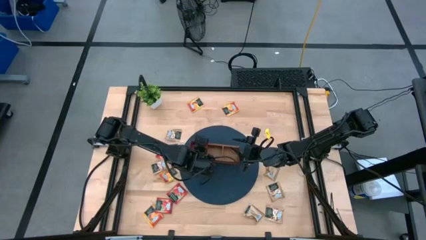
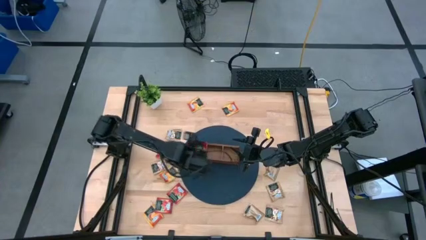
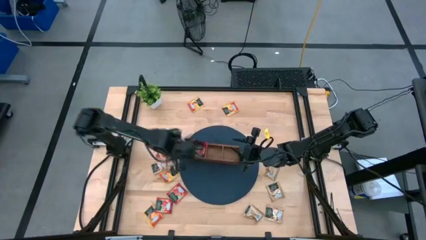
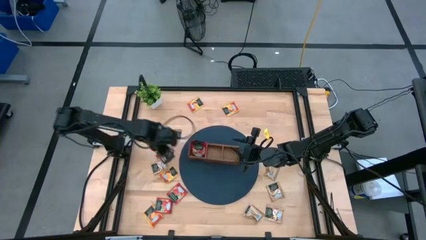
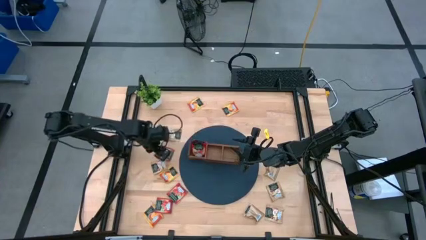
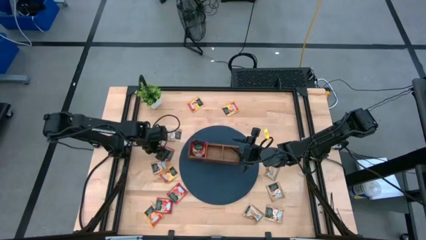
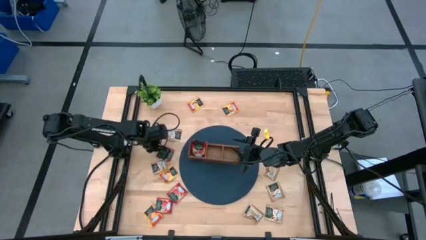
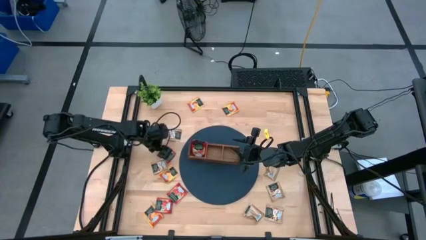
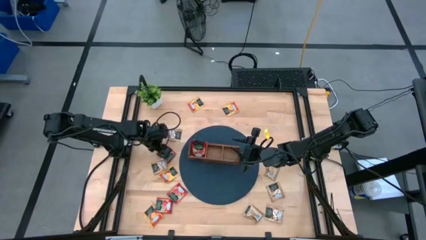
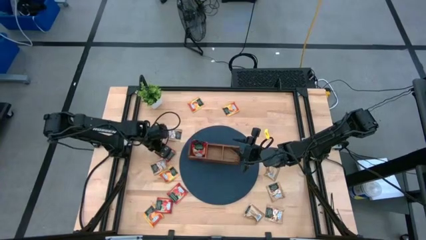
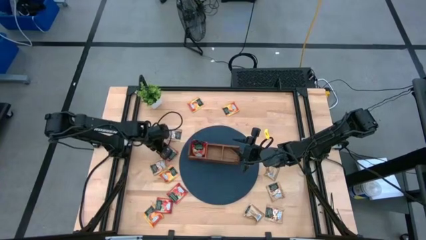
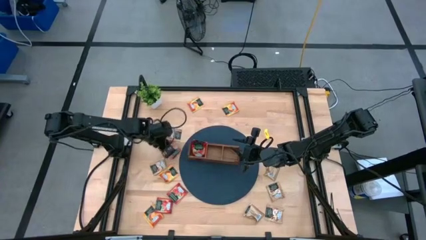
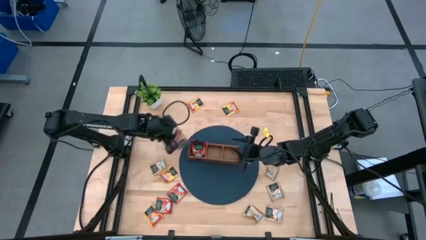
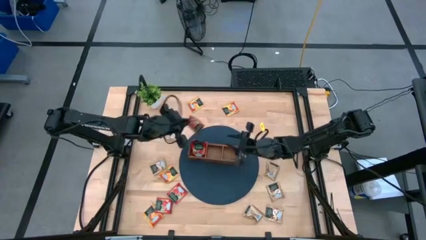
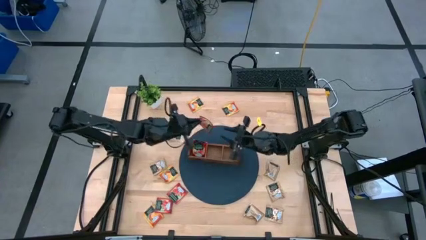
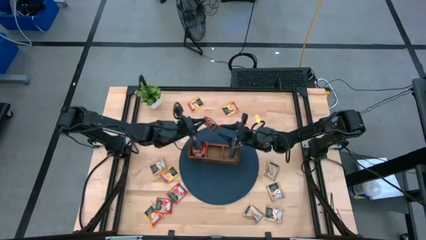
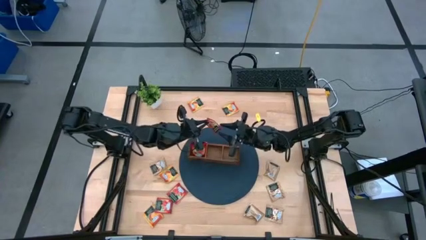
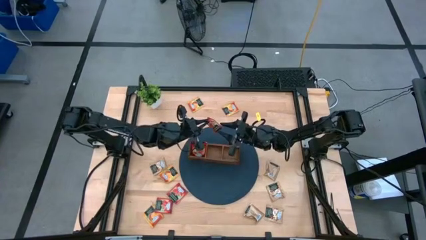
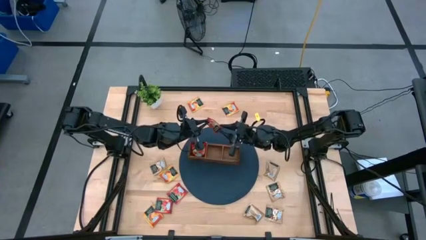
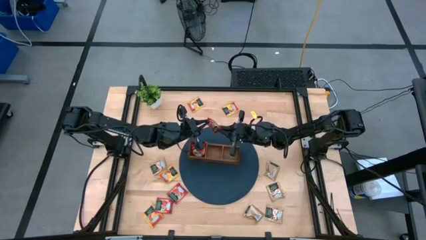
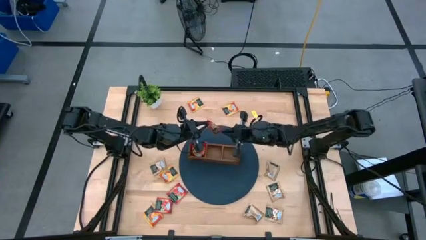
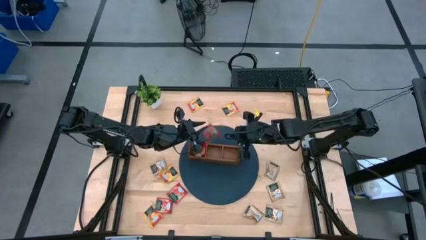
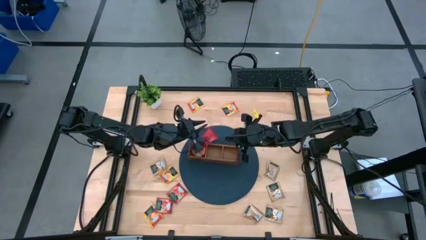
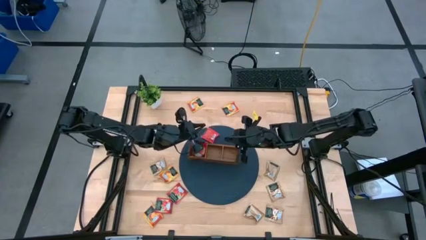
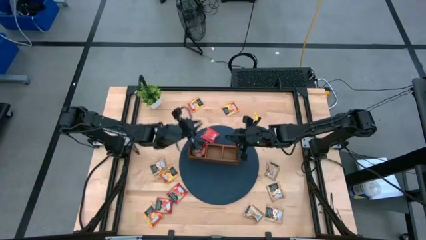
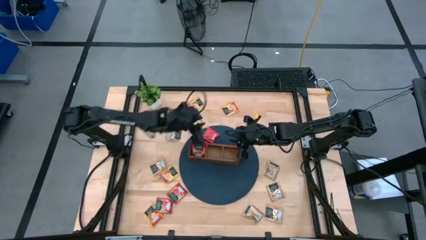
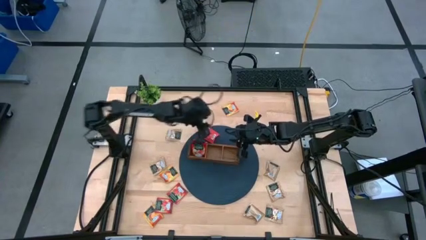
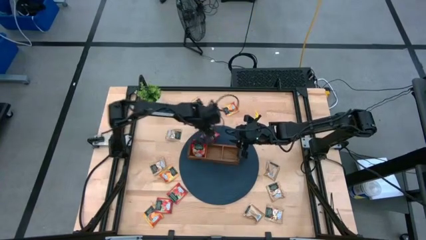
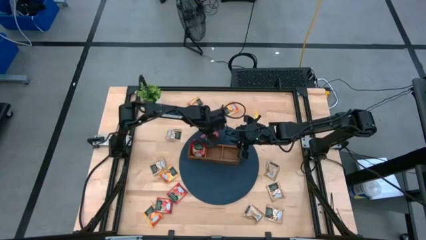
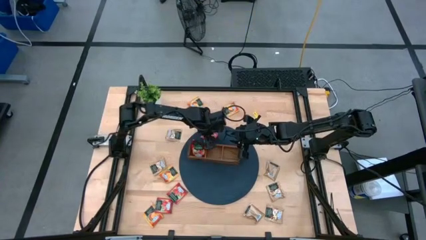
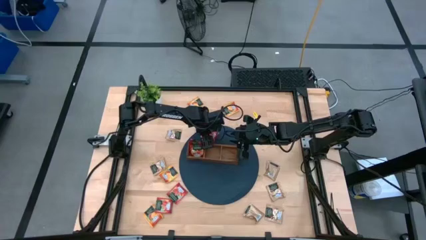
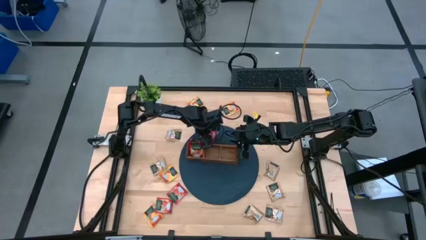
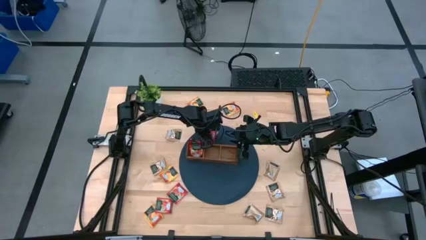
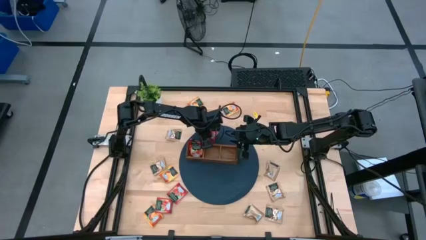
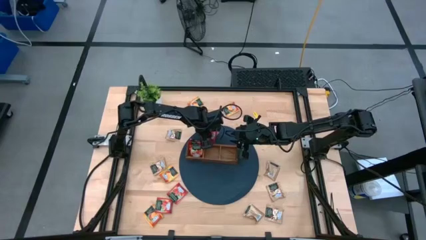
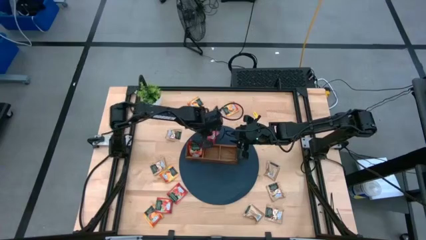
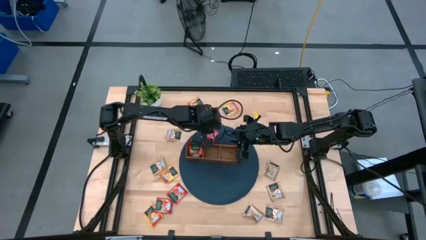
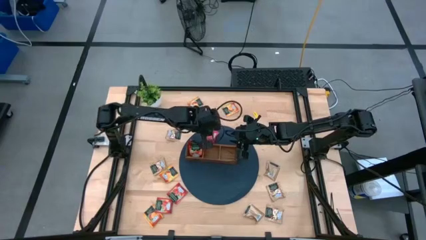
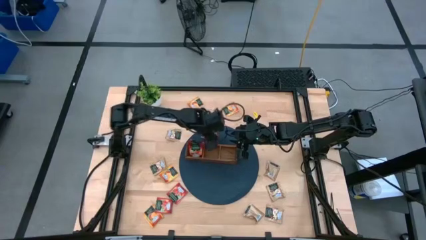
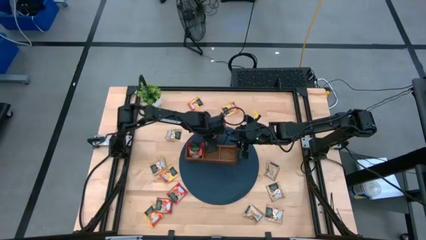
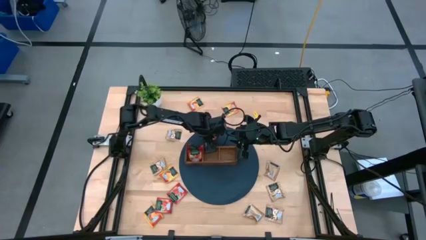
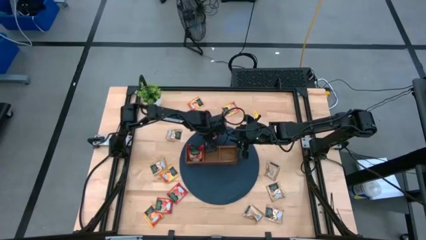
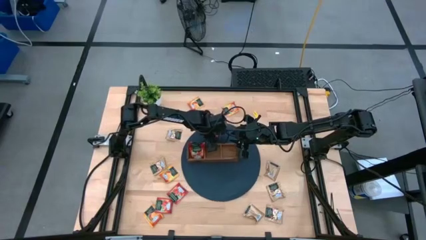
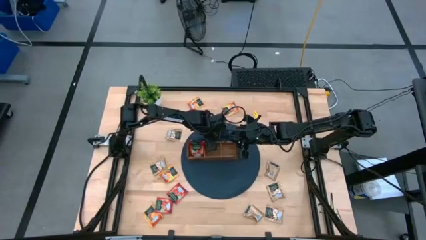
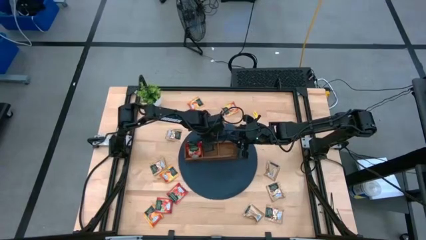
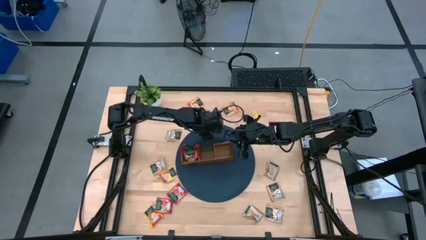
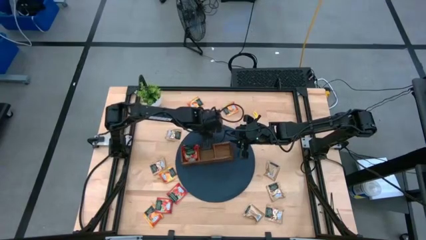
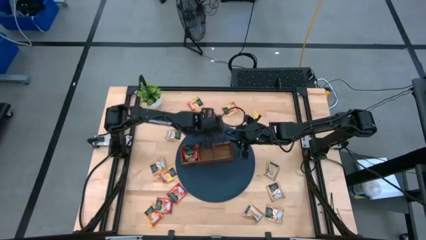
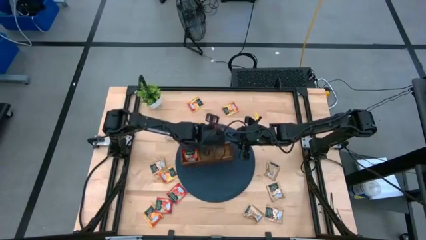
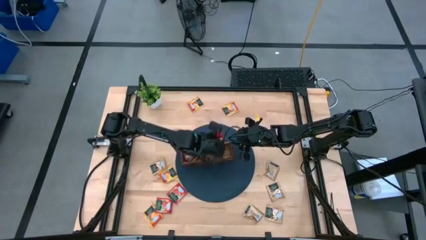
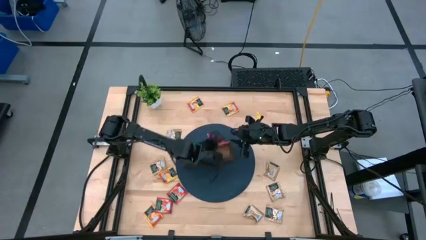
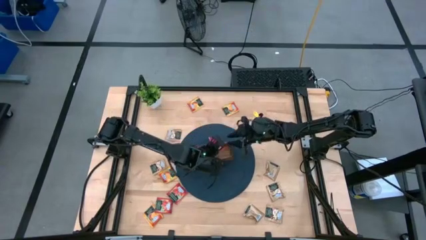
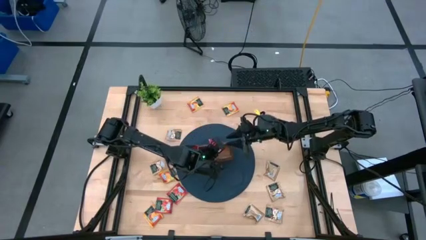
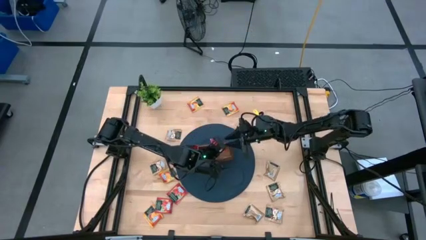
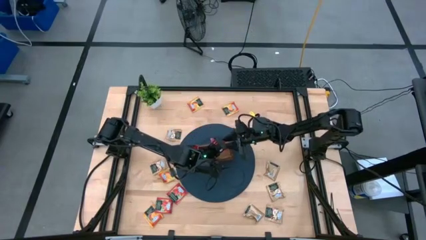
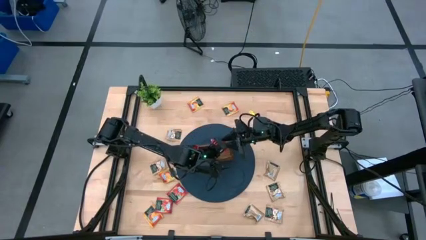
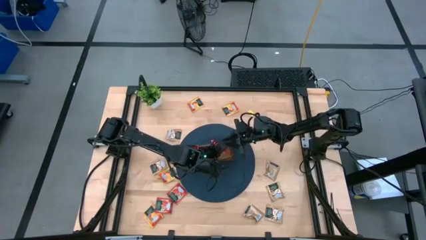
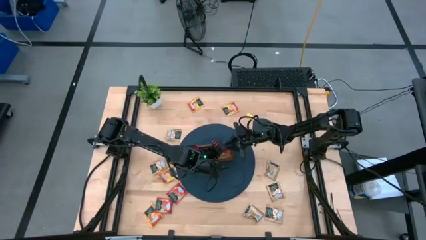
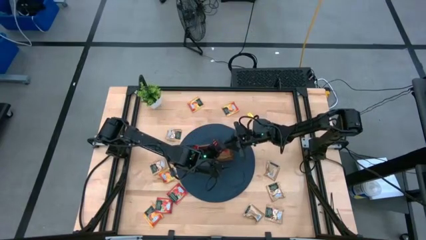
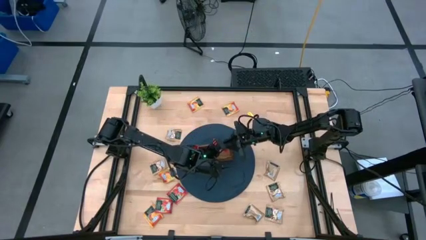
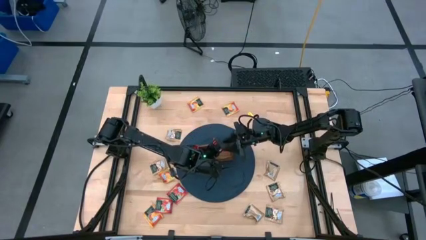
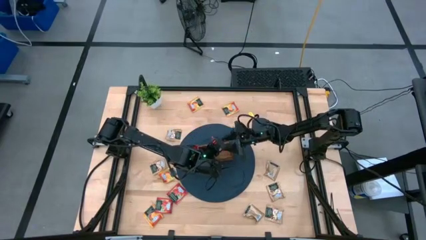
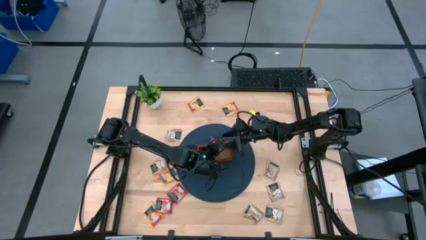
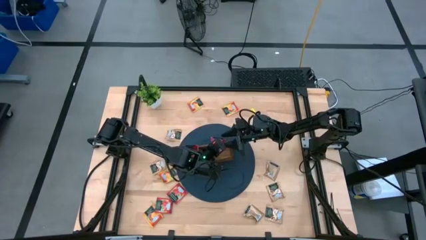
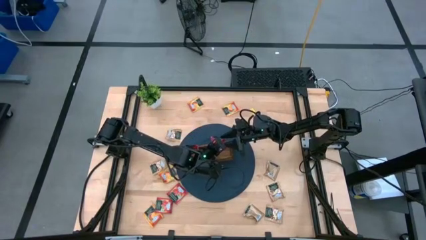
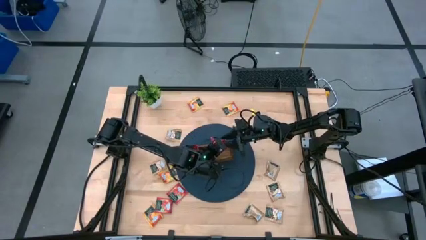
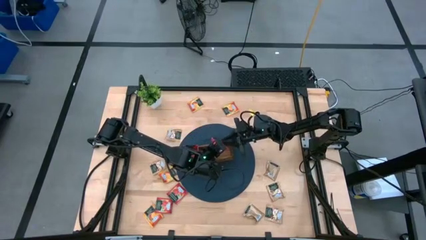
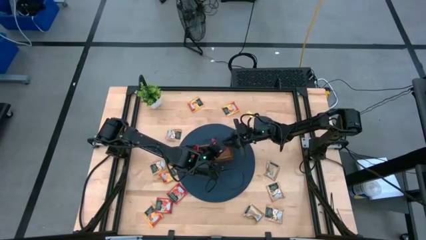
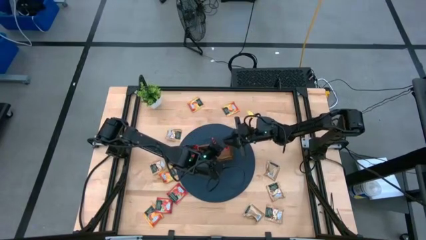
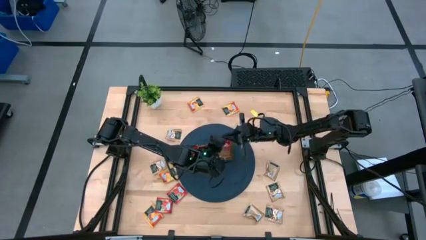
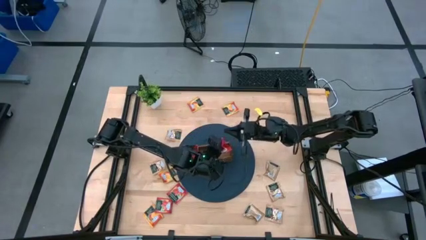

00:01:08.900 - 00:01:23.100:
Task: Pick & Place Tea
Put the top red tea bag into the left section of the wooden organizer
